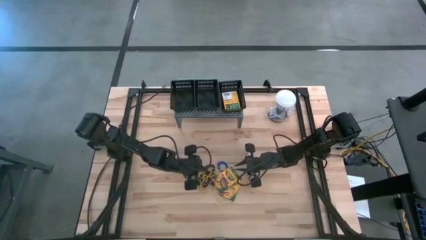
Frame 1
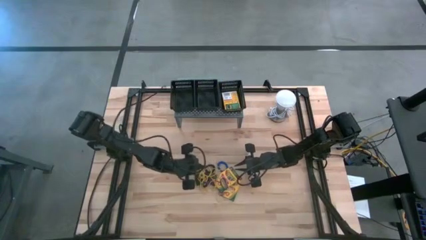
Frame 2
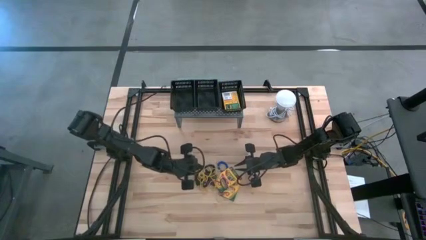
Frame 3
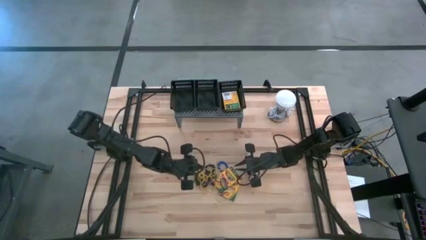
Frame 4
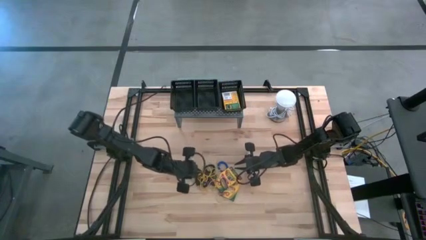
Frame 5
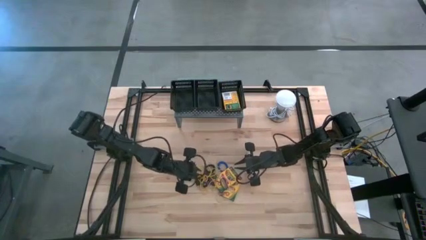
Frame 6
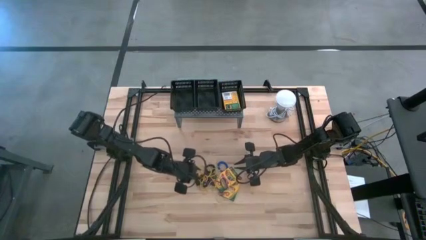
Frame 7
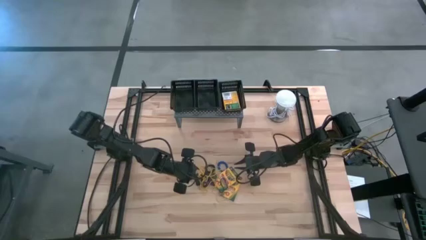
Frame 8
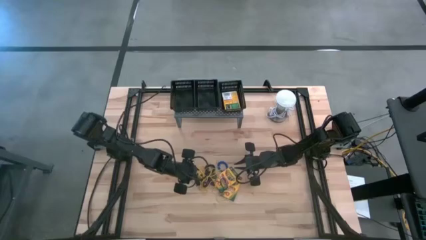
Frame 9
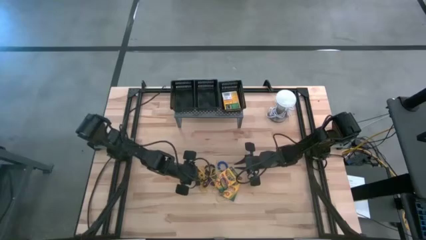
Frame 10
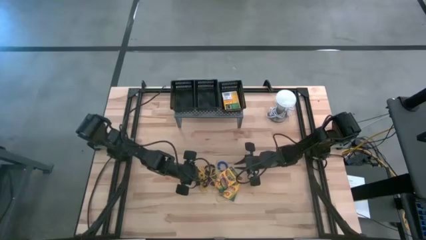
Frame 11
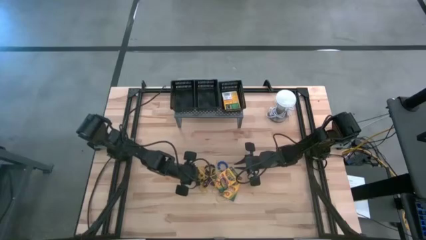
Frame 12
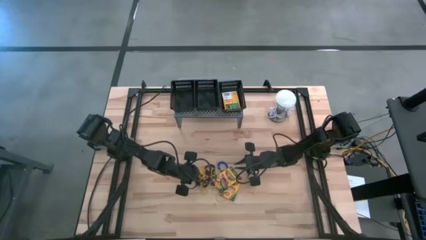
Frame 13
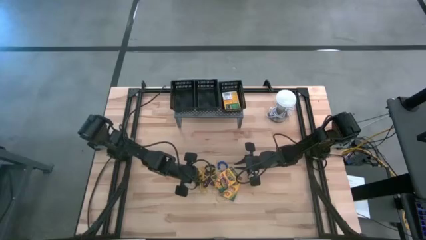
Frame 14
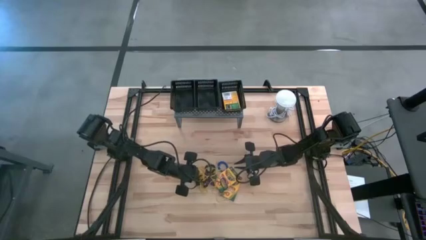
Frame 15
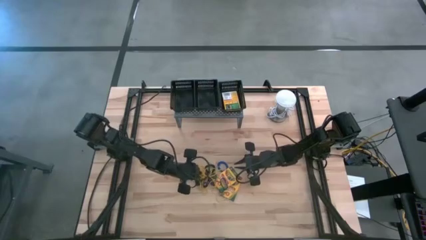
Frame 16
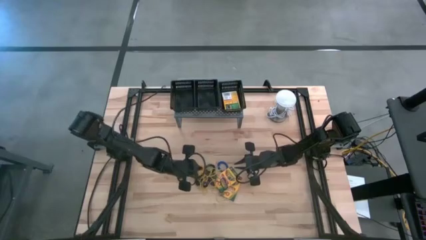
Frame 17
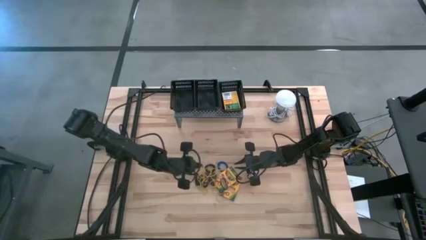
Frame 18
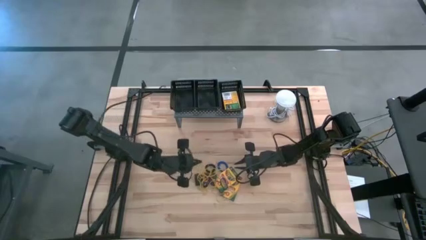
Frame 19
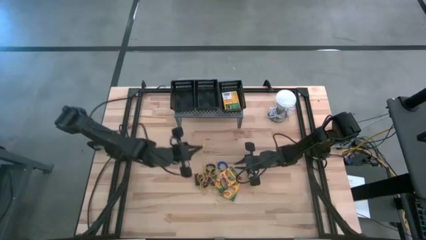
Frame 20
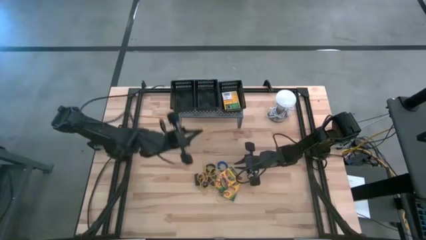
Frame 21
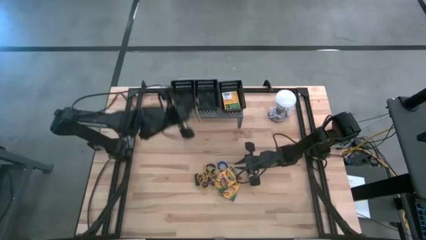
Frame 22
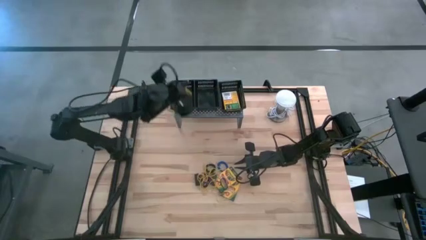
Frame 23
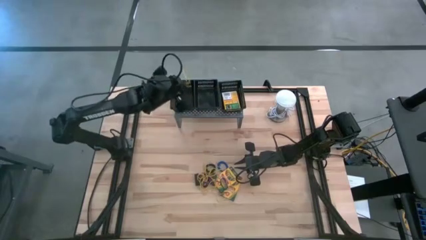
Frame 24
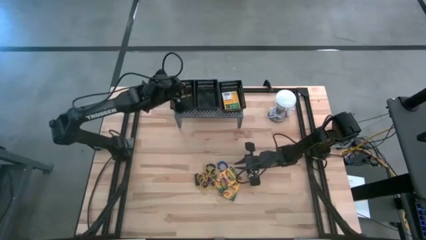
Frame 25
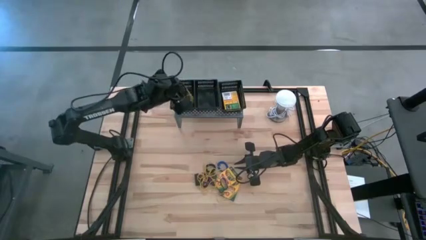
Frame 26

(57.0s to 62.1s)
Task: Pick & Place Office Desk Supplies
Put the yellow rubberband into the left black bin on the shelf

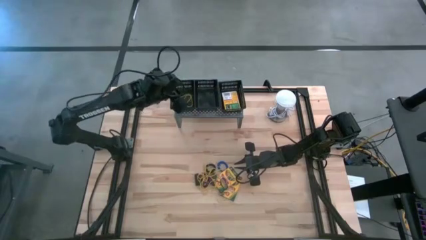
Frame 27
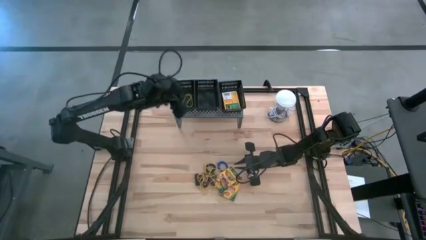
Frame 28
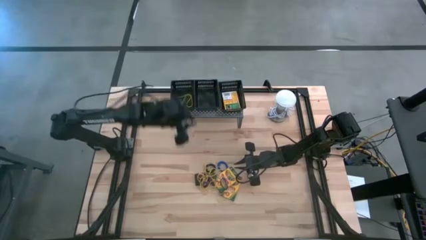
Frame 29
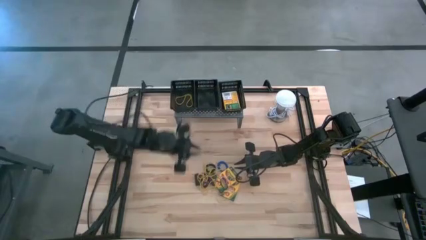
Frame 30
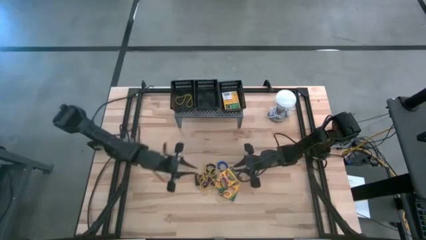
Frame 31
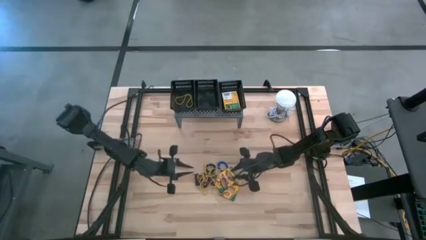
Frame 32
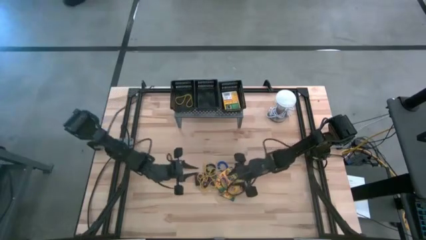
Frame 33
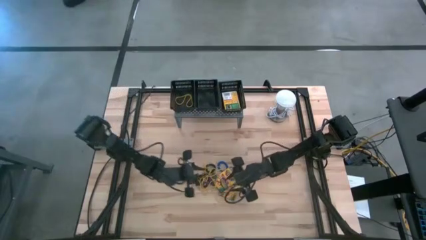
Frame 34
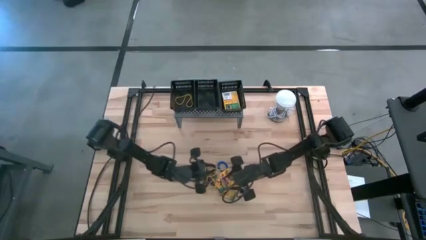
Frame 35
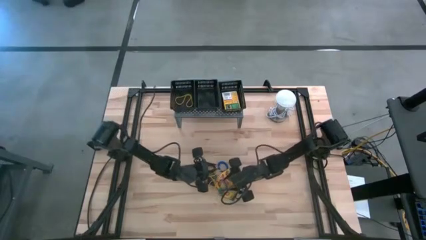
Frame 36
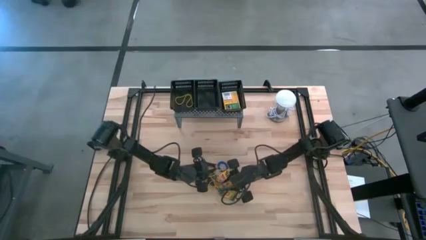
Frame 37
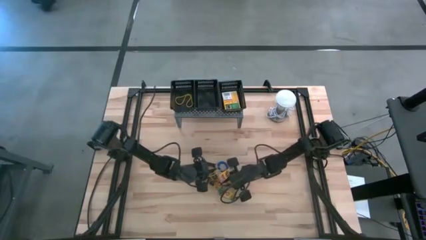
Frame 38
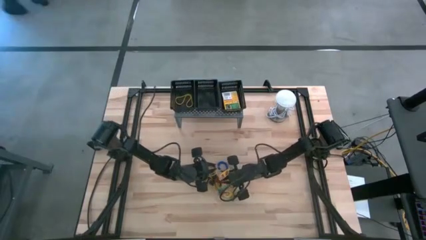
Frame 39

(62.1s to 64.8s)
Put the black rubberband into the left black bin on the shelf

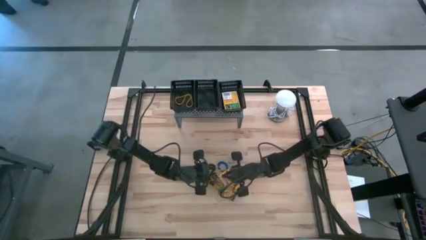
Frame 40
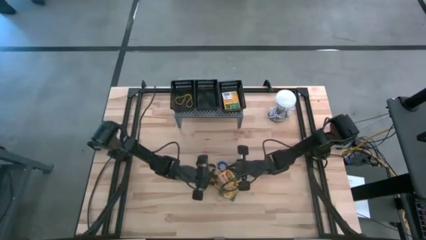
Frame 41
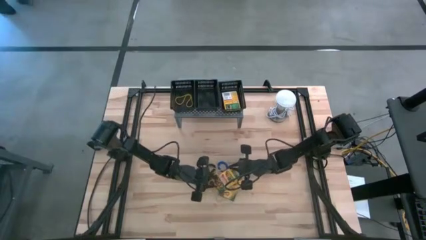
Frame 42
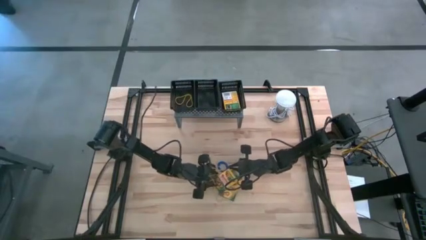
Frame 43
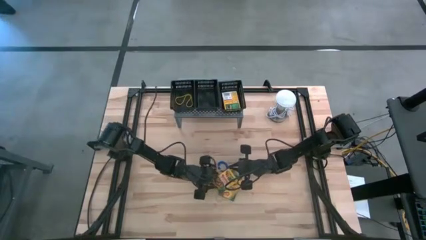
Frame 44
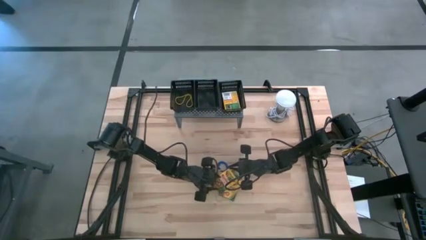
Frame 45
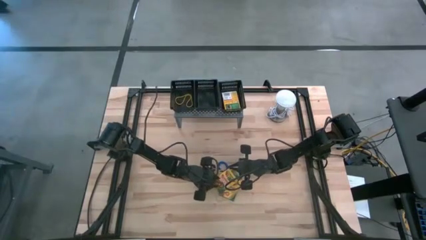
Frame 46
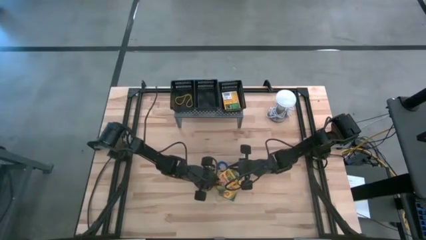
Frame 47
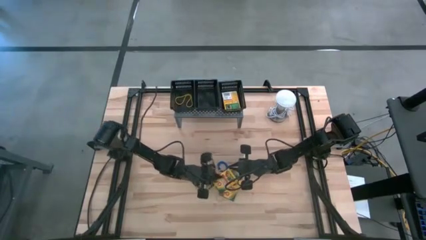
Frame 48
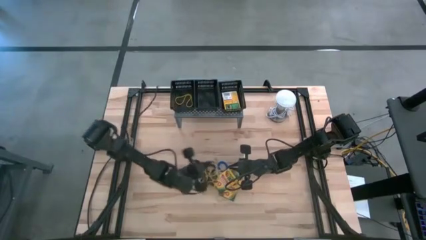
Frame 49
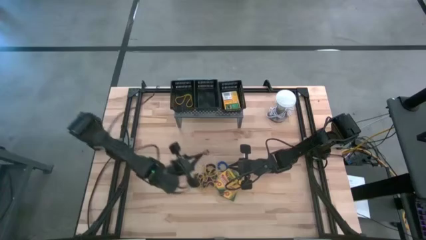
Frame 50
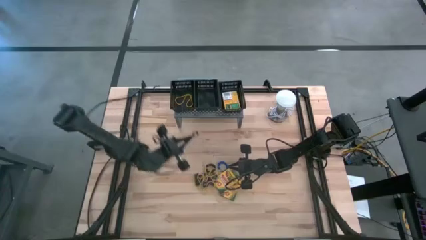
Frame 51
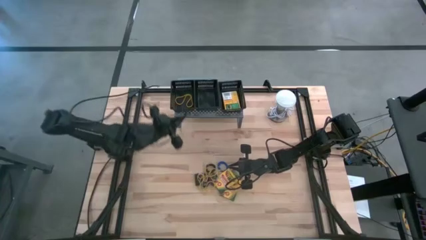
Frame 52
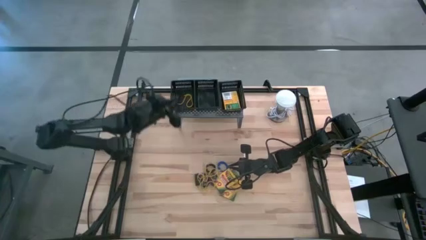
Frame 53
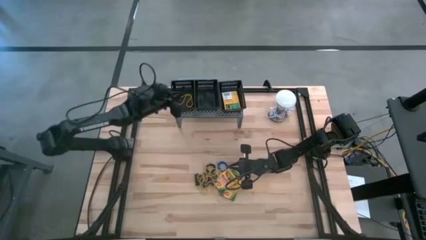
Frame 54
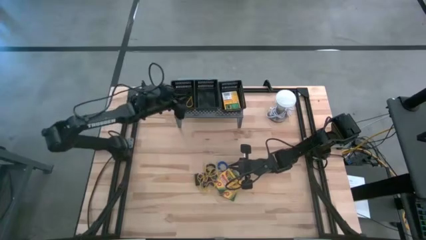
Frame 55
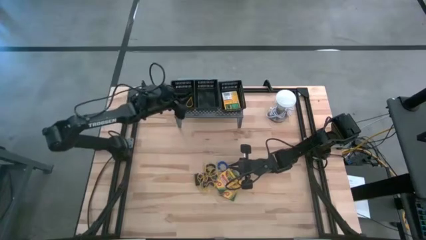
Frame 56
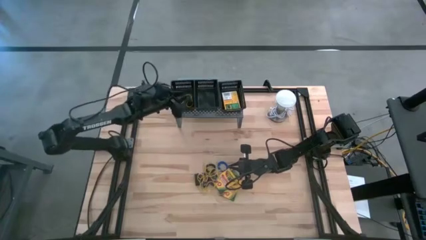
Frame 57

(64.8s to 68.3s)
Put the black rubberband into the left black bin on the shelf

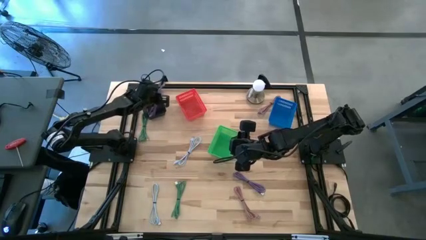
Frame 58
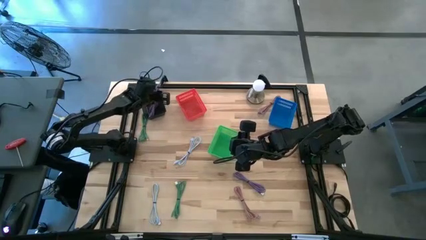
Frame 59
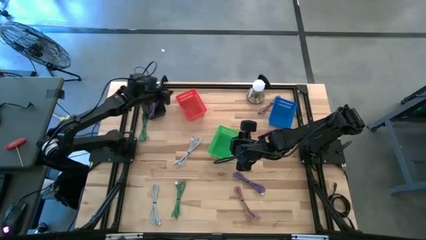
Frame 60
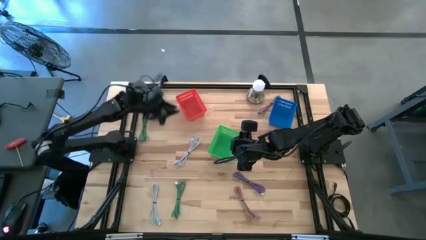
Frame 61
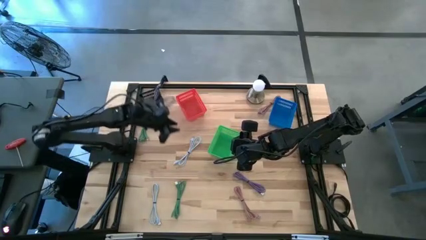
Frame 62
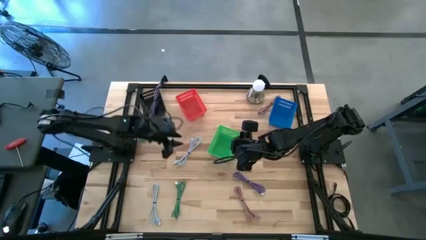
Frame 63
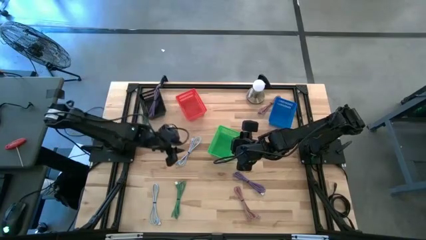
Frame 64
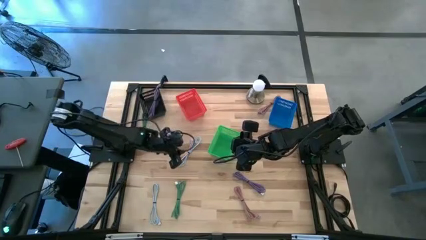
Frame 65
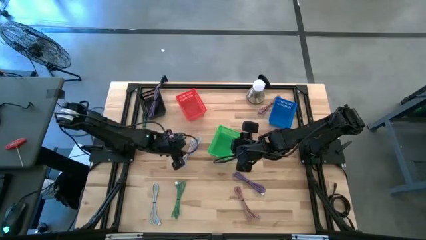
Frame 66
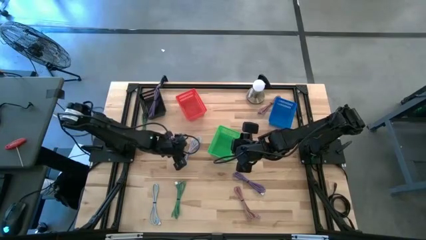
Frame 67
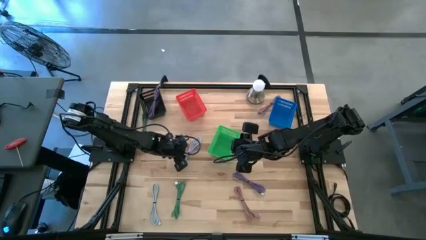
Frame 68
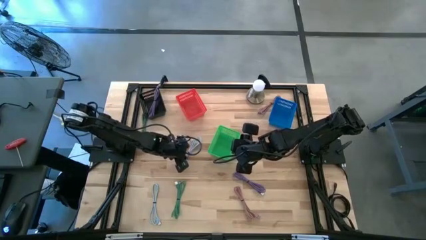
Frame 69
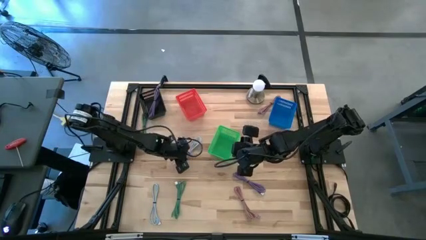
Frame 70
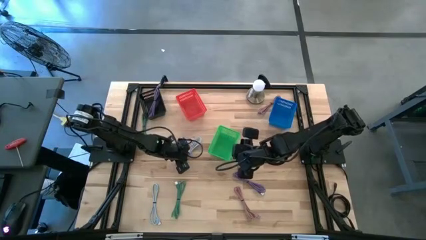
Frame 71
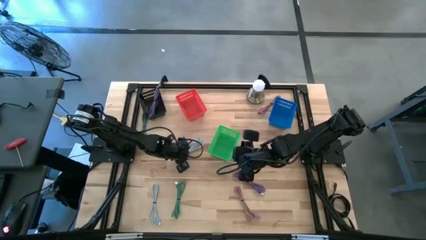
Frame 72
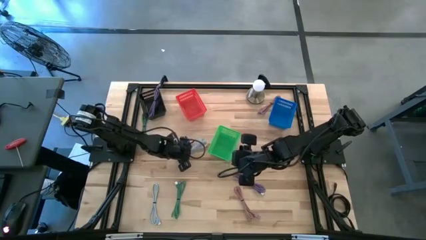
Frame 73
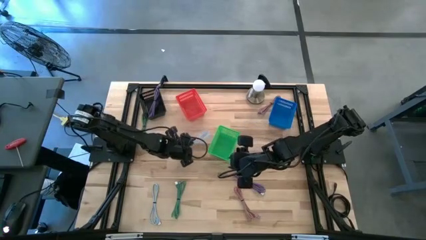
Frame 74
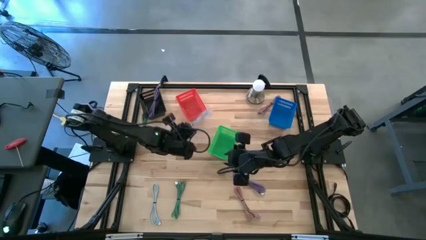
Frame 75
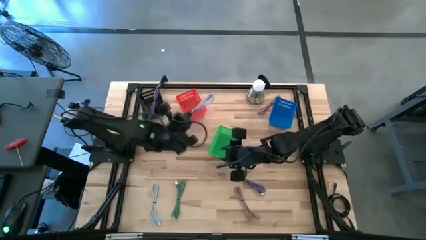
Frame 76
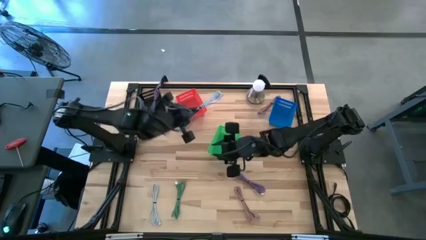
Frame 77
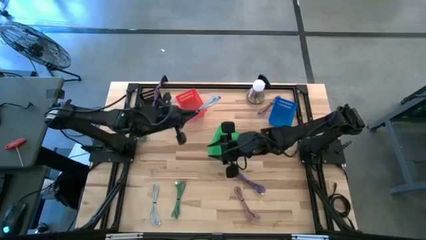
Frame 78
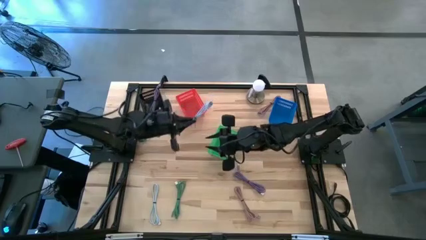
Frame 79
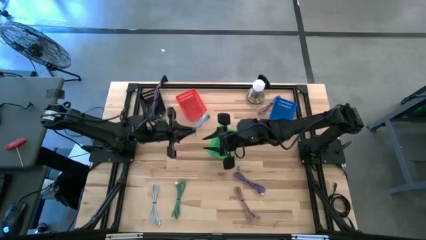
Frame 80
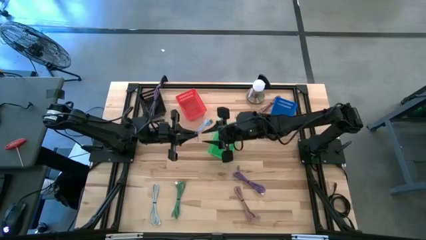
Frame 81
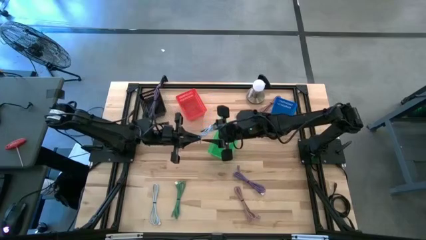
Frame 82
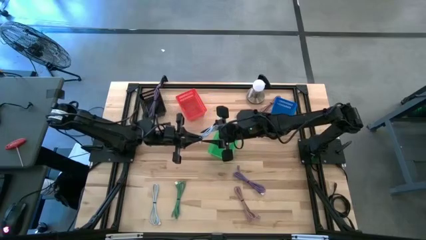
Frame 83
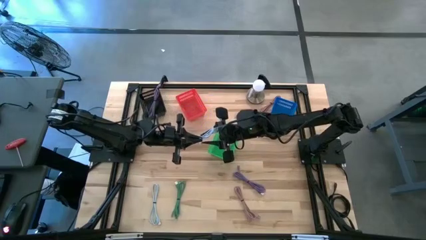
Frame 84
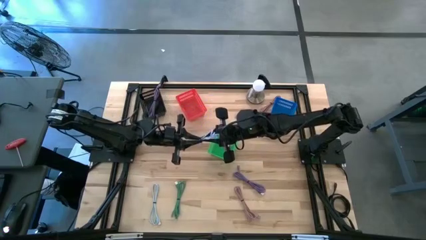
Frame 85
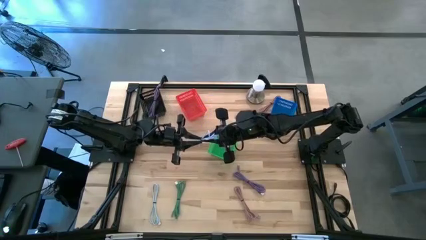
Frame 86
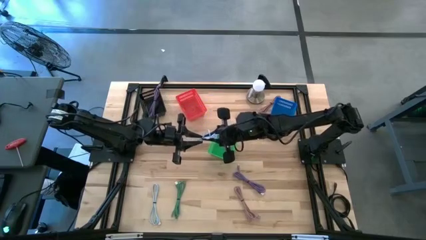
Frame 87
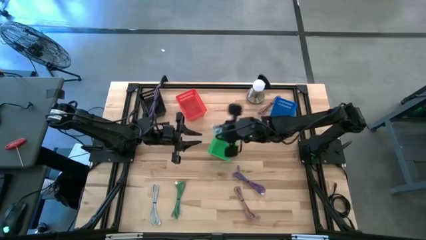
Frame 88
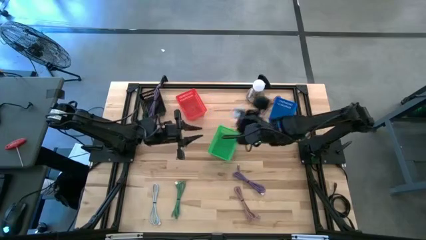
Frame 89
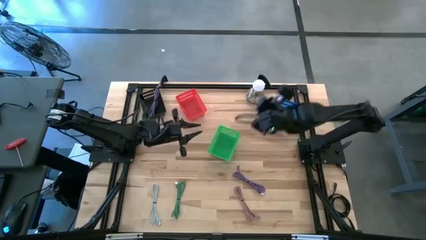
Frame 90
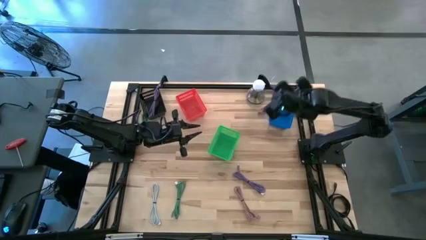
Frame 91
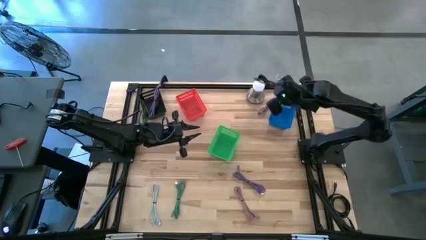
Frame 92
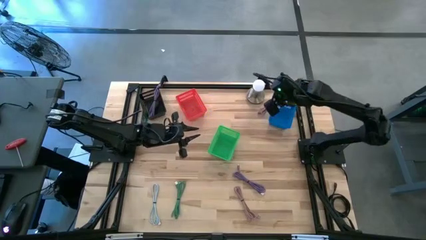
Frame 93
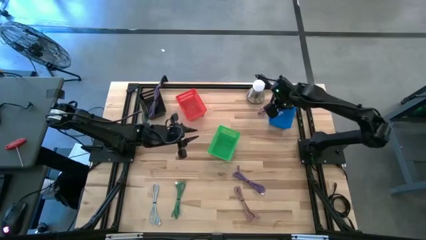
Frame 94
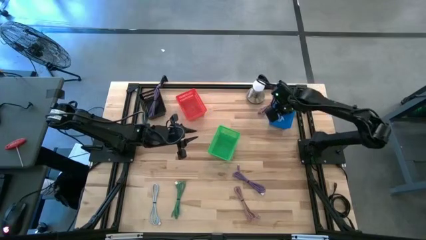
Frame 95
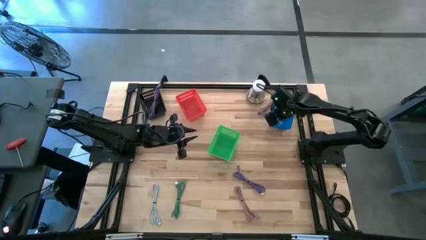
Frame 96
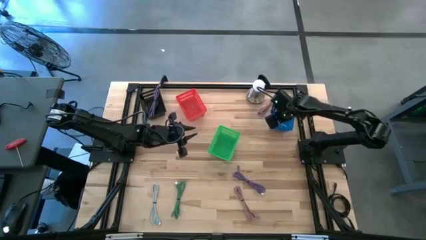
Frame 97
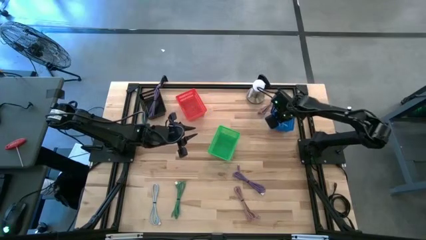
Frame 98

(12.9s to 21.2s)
Task: Pick & Place USB Port
Put the top white charger cable into the blue basket
